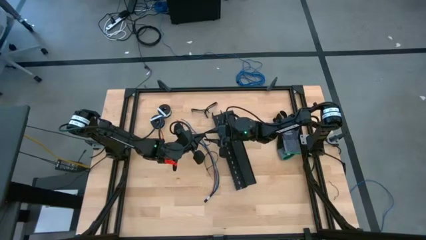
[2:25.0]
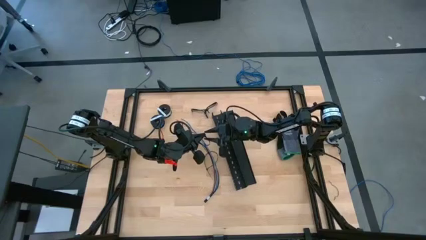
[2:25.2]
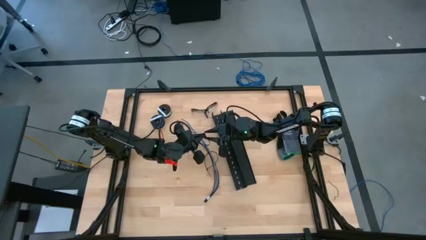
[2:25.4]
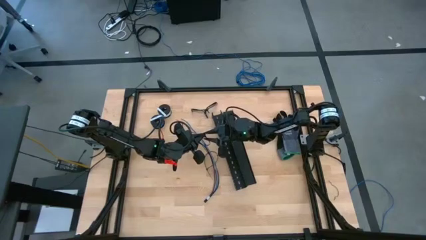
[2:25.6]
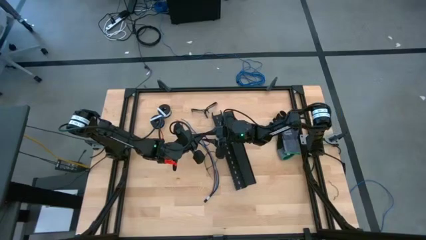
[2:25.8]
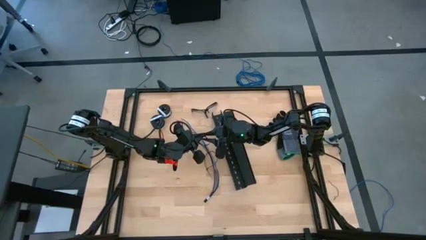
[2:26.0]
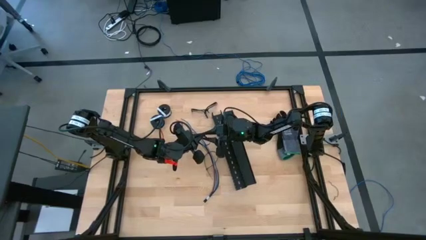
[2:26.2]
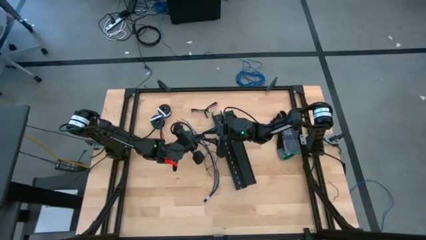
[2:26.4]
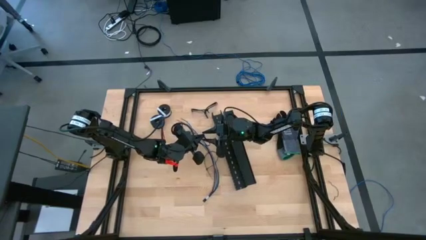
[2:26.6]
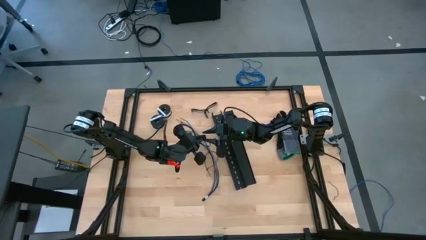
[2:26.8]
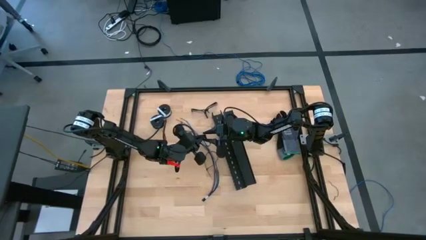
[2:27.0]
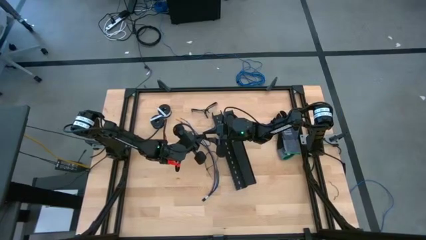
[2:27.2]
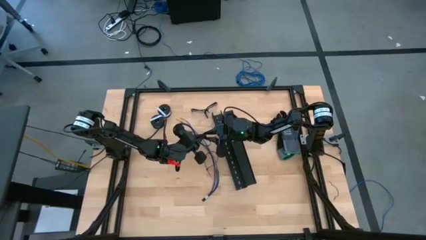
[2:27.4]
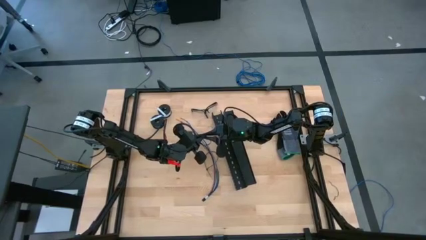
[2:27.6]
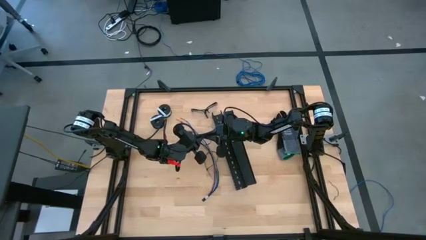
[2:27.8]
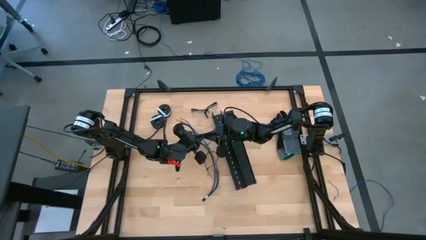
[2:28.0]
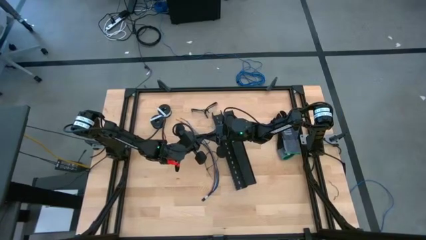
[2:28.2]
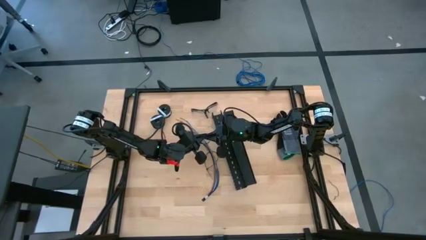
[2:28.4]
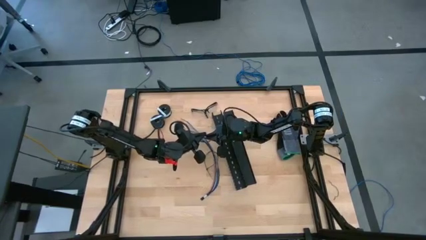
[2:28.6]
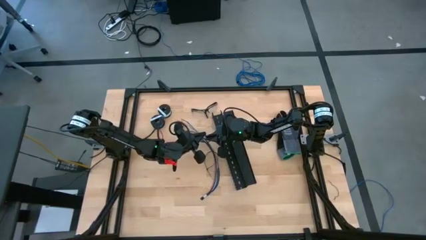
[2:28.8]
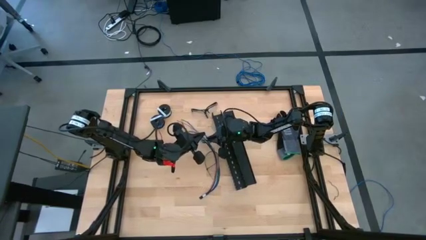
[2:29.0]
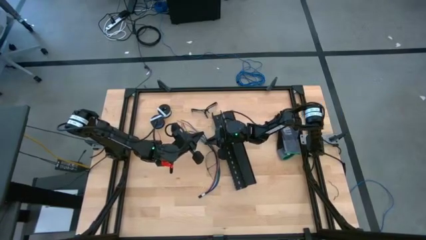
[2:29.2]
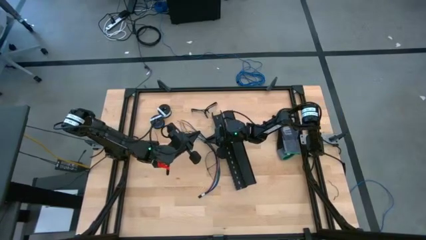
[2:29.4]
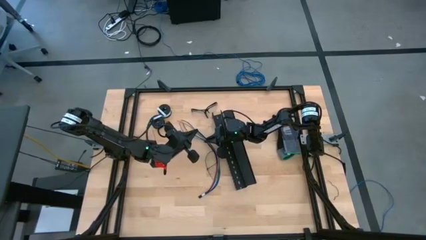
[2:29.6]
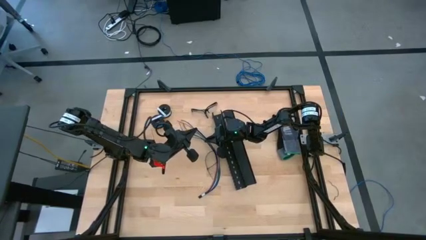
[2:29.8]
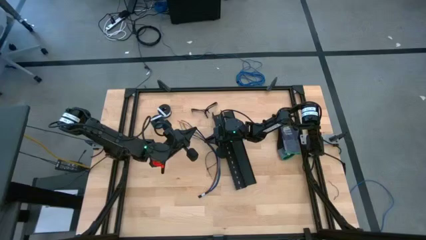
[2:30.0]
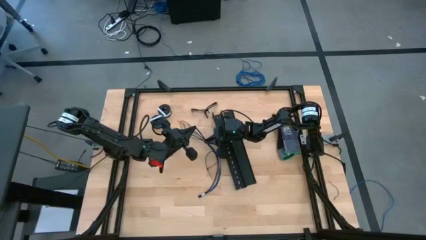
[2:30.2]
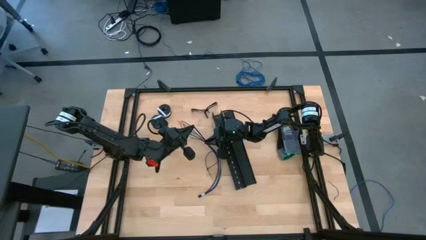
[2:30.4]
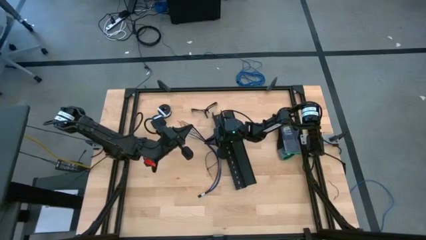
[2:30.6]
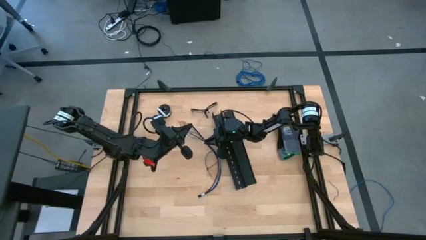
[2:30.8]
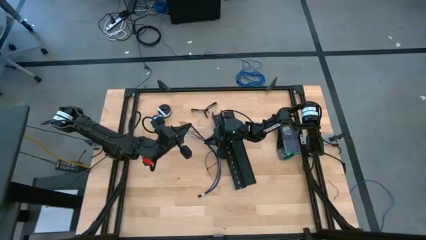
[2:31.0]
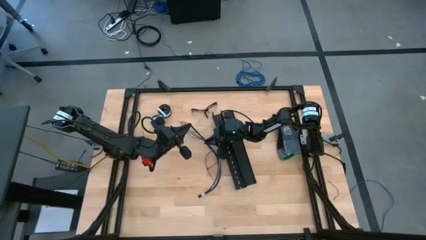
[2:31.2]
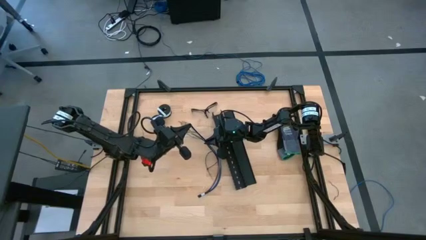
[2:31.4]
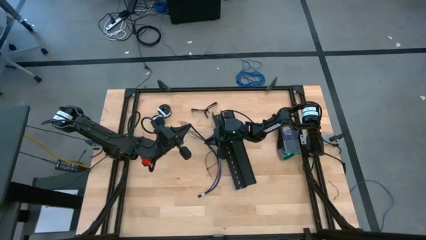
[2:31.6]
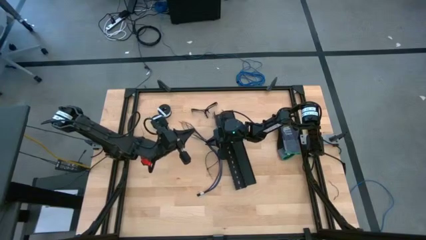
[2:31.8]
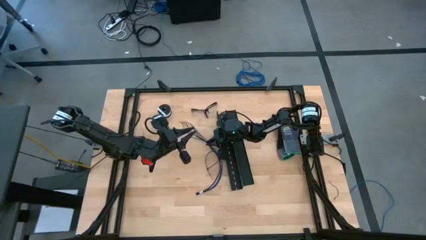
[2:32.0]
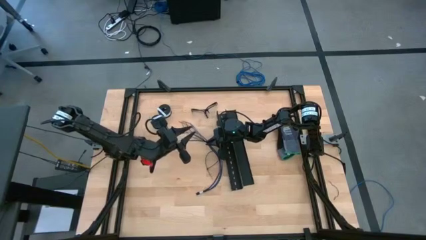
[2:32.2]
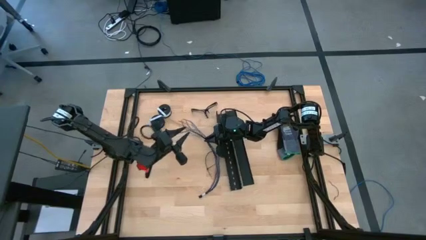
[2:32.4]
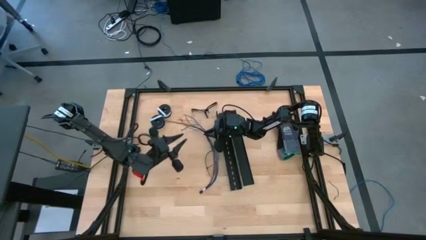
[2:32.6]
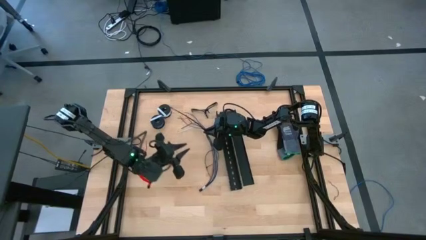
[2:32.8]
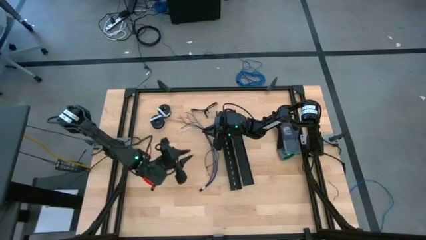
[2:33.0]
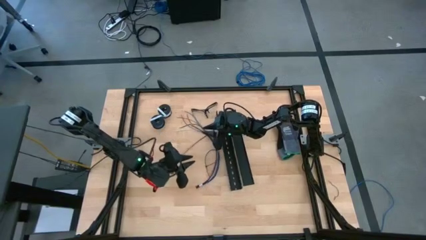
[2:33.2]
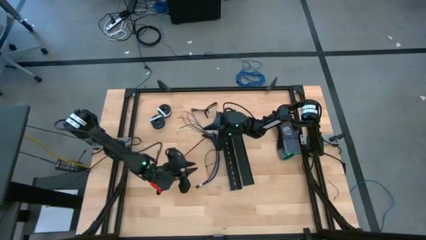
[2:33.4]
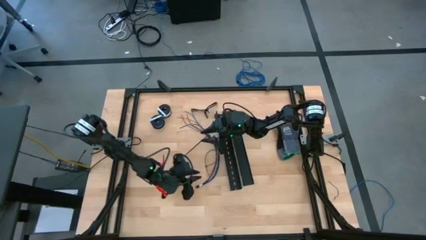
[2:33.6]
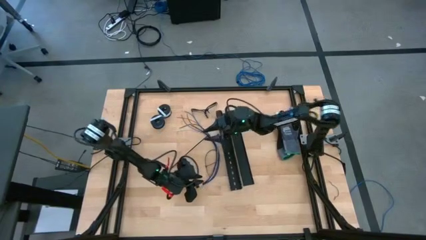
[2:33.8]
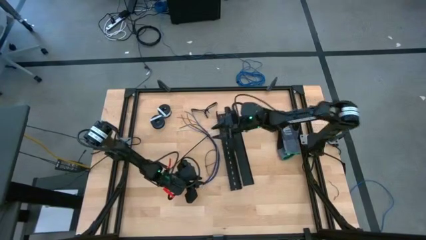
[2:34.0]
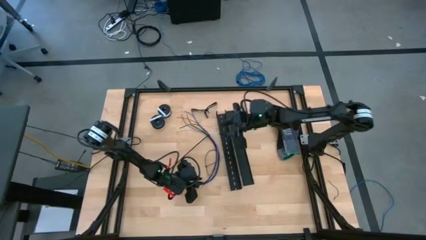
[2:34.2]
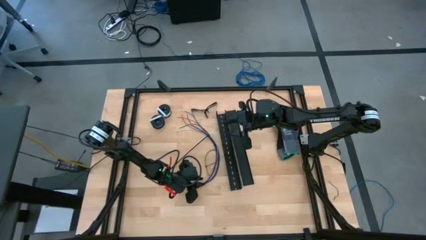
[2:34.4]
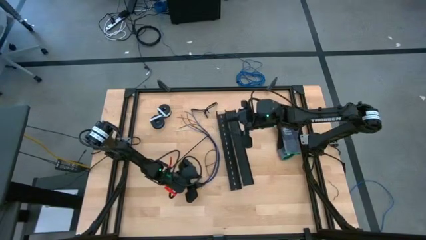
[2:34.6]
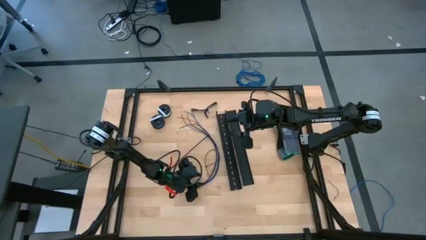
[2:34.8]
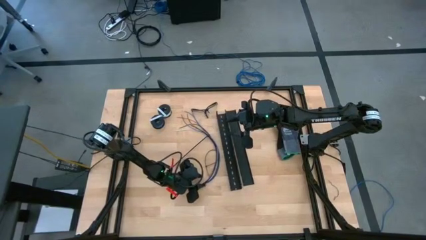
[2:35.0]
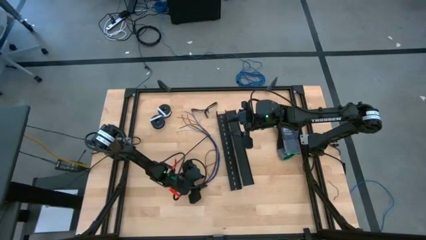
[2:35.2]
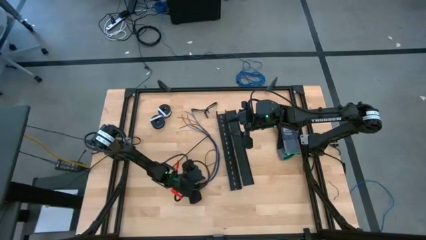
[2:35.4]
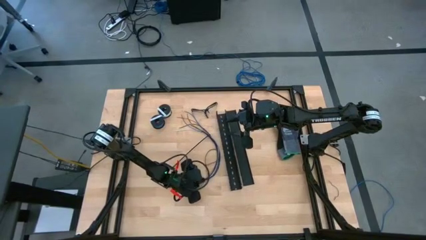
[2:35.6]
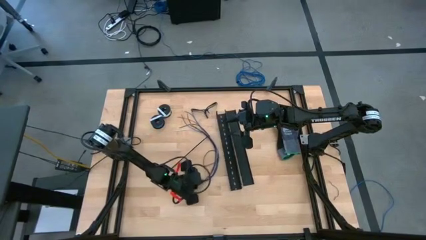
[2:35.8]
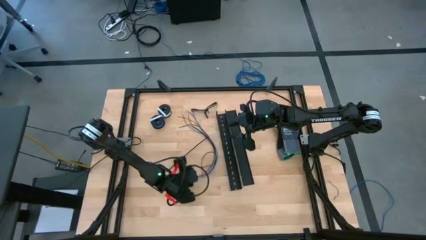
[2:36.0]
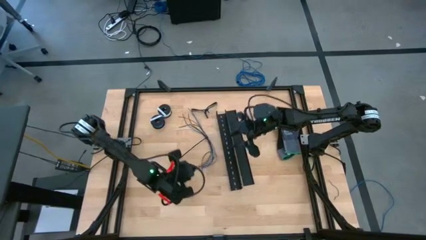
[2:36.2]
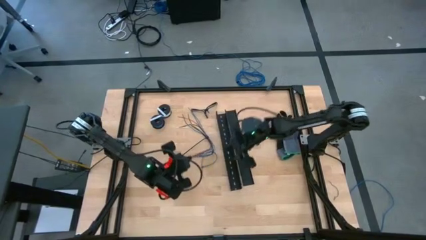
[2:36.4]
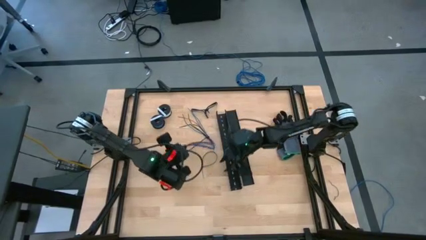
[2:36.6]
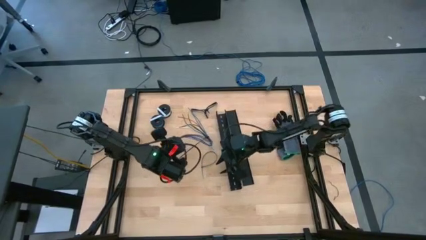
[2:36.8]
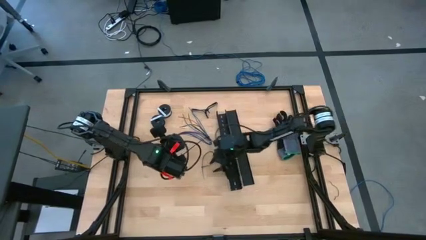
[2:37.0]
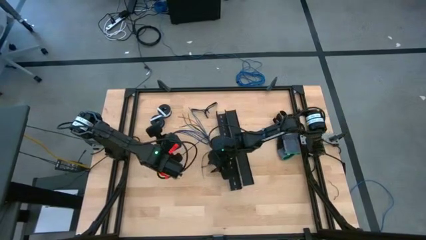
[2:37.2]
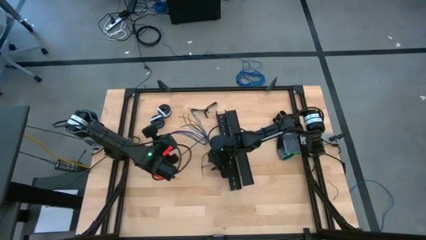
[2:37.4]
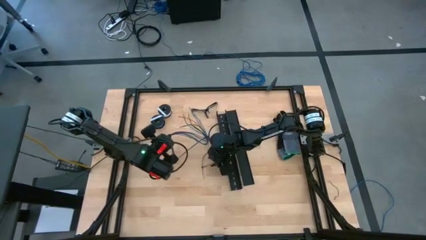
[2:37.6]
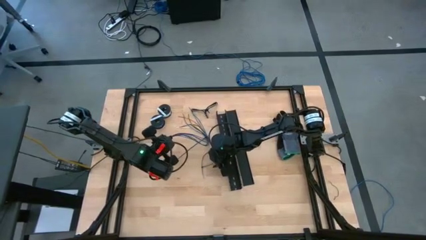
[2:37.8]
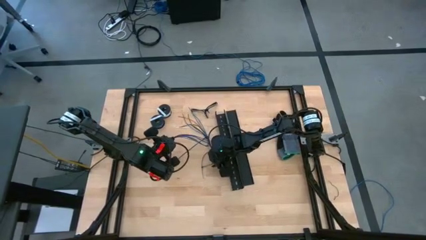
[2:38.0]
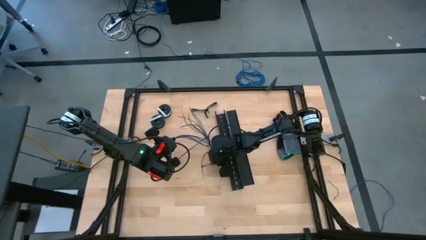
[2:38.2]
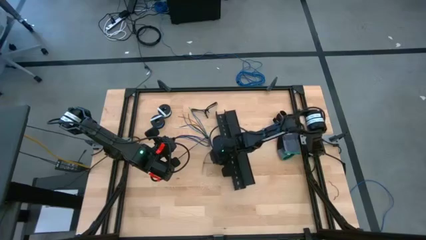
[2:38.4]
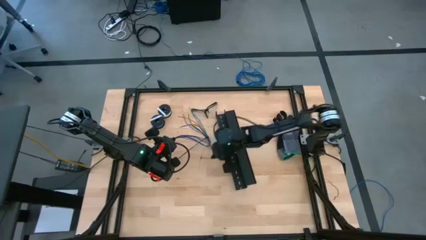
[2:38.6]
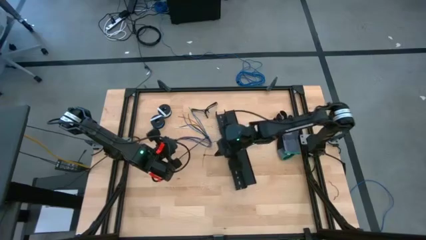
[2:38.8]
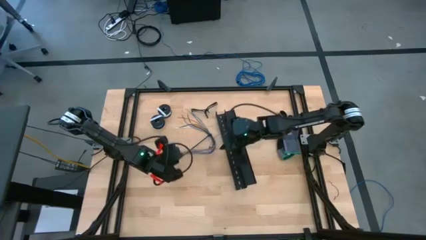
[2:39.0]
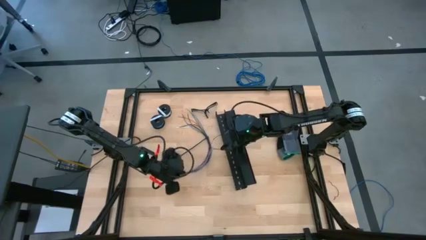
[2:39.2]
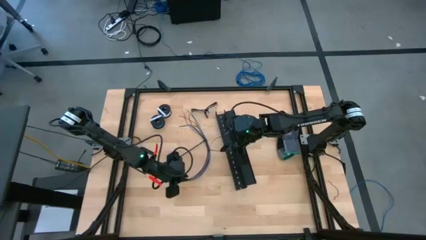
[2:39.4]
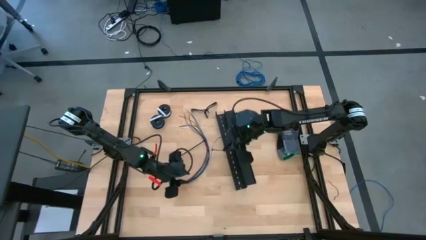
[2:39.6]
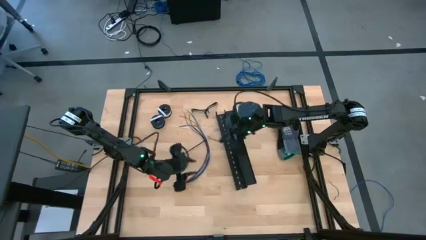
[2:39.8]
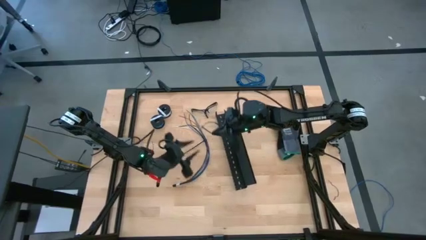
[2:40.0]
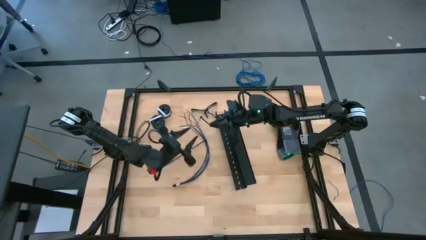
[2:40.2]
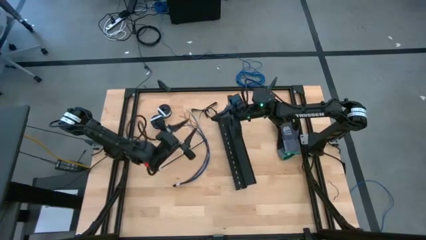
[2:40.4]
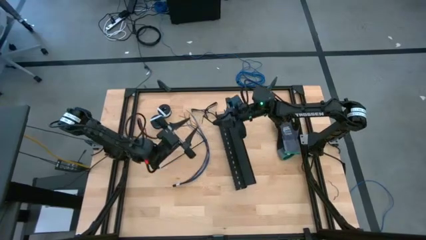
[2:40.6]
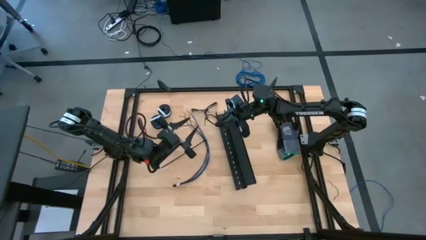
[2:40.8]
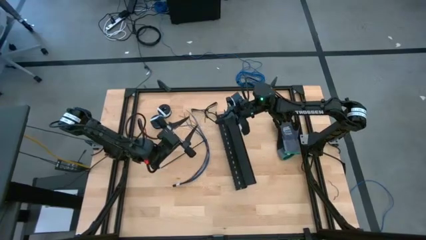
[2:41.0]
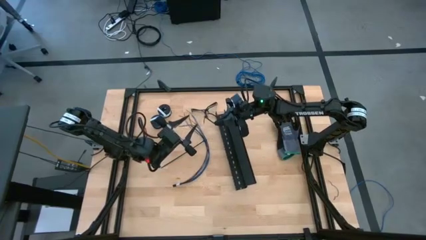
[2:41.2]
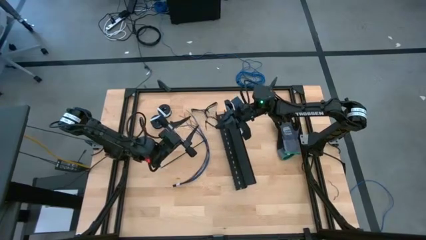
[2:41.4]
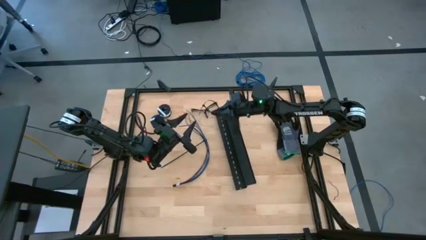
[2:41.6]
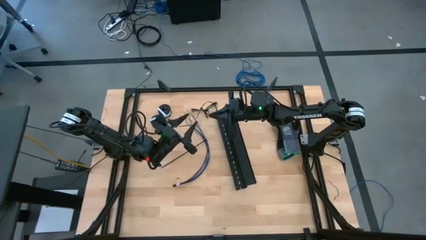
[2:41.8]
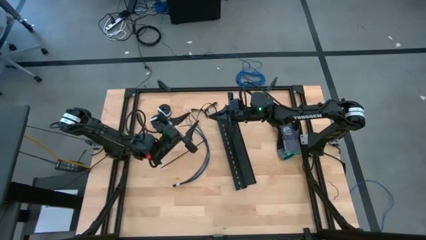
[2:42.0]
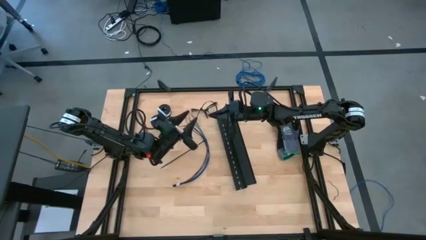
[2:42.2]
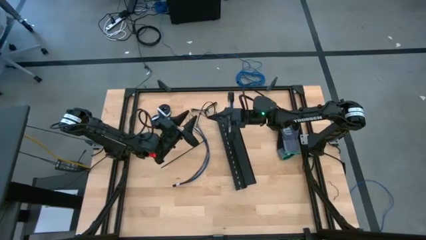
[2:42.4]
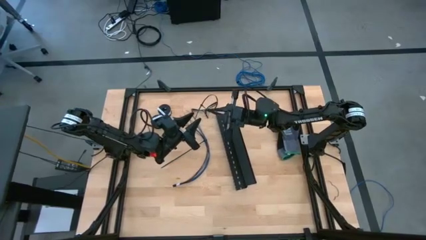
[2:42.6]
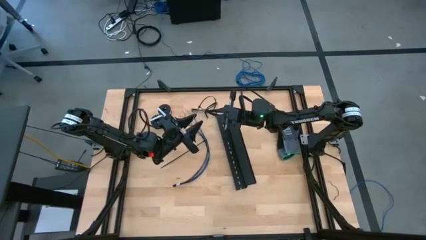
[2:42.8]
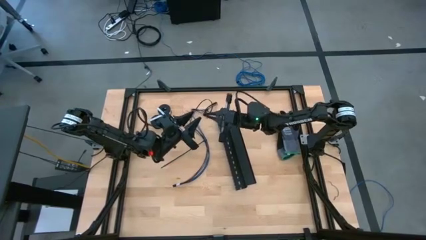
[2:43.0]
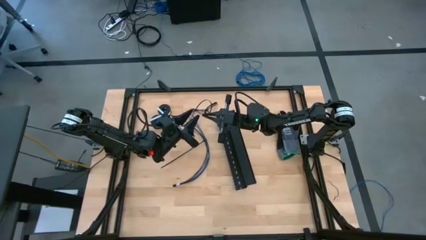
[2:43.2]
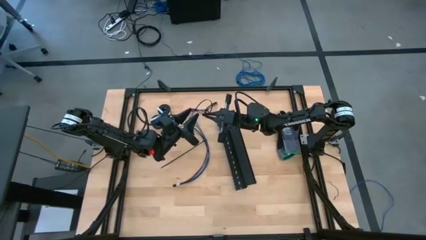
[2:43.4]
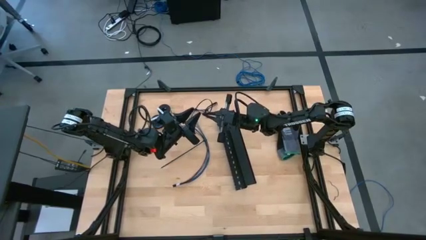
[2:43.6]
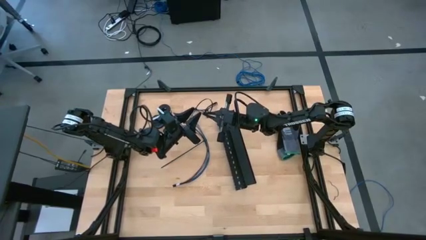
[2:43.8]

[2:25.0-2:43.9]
Task: Ziptie cables
Wrap the black zip tie on the cable
